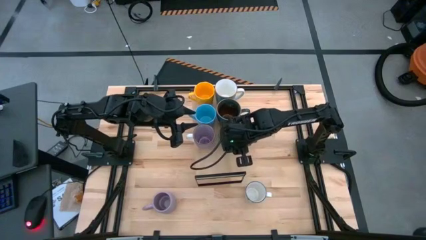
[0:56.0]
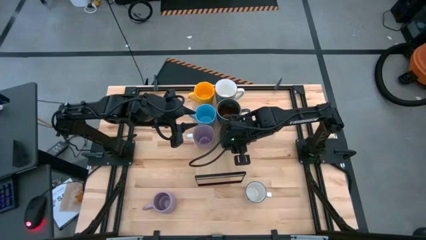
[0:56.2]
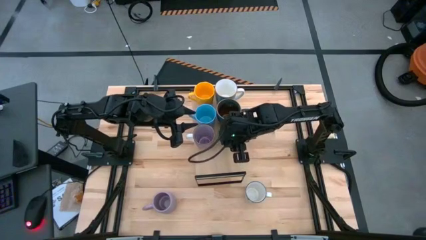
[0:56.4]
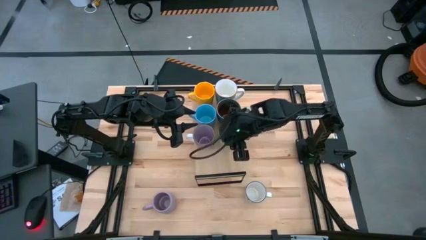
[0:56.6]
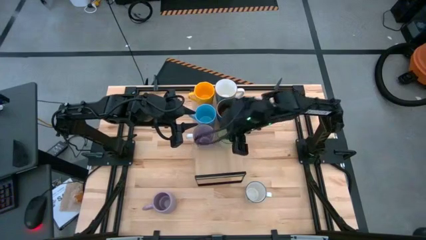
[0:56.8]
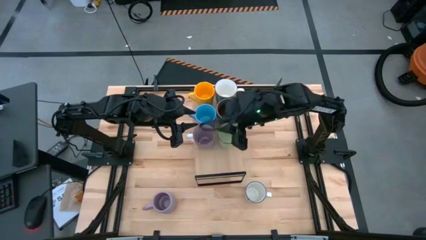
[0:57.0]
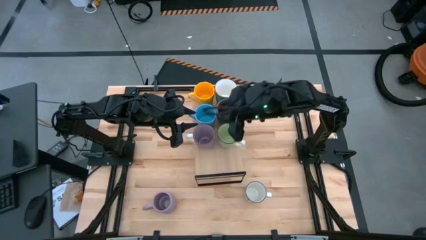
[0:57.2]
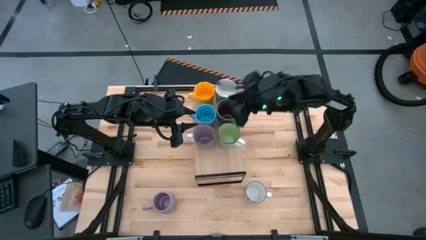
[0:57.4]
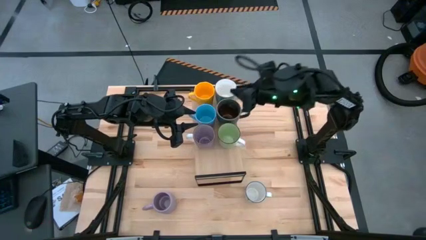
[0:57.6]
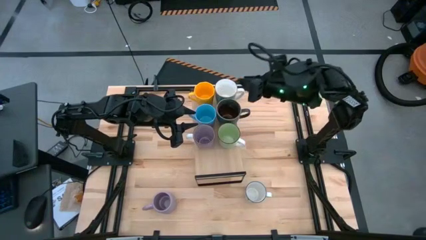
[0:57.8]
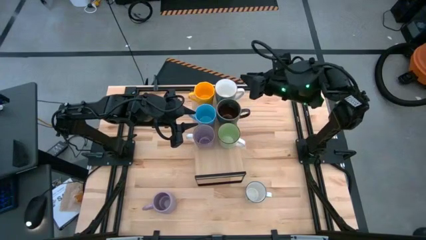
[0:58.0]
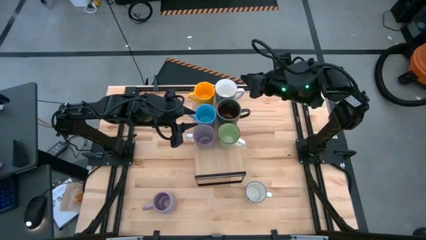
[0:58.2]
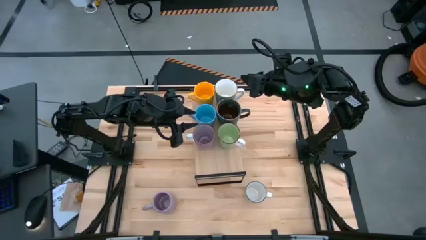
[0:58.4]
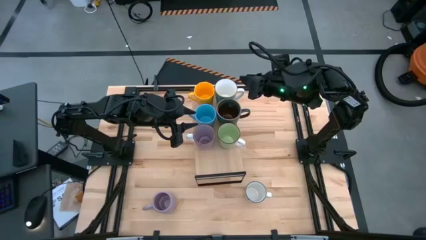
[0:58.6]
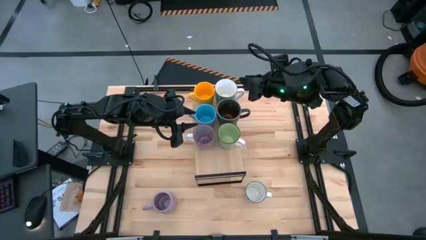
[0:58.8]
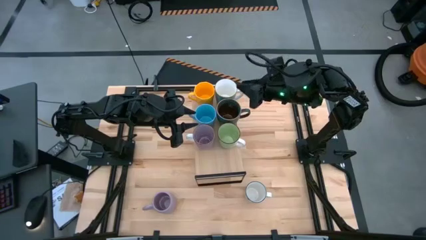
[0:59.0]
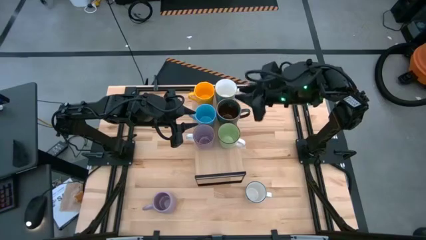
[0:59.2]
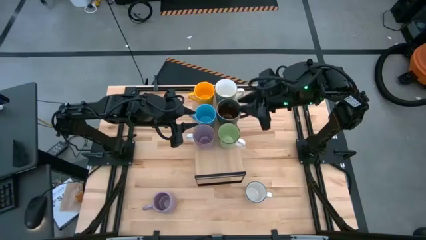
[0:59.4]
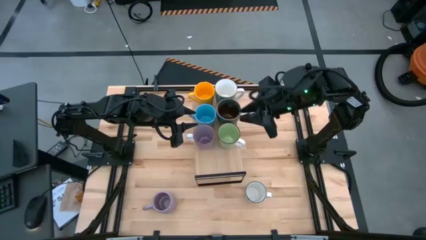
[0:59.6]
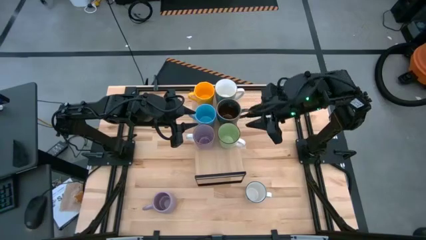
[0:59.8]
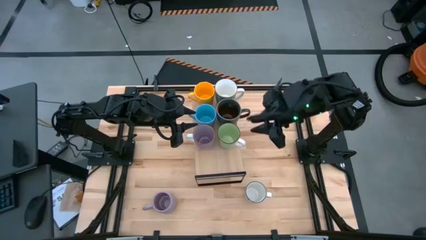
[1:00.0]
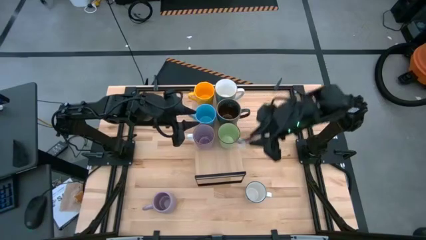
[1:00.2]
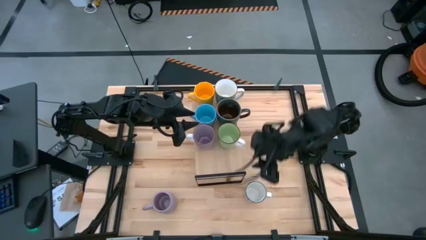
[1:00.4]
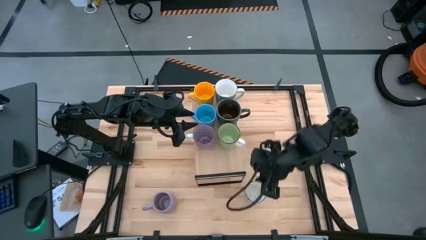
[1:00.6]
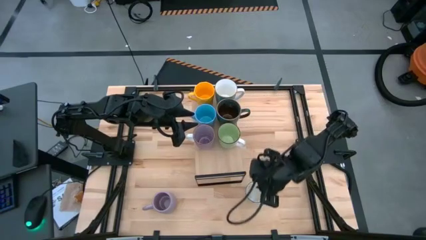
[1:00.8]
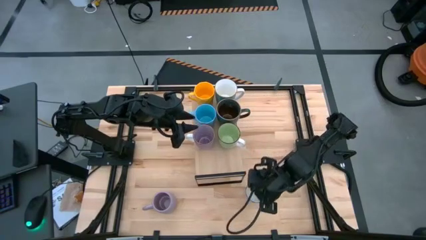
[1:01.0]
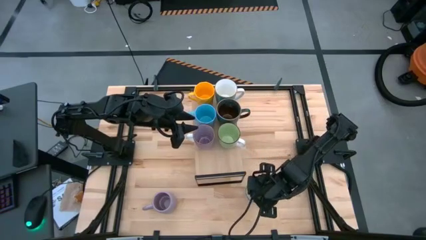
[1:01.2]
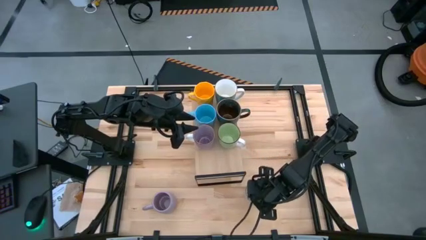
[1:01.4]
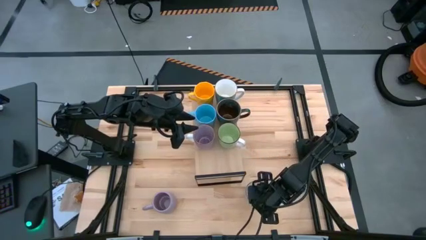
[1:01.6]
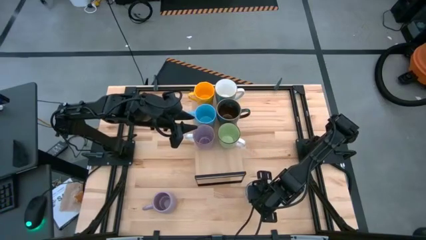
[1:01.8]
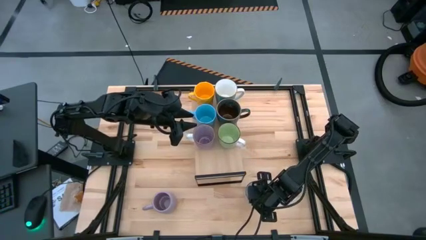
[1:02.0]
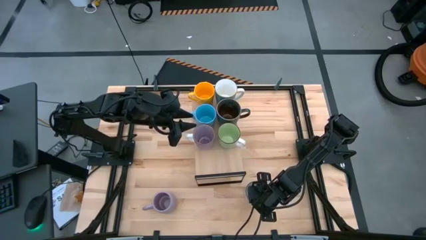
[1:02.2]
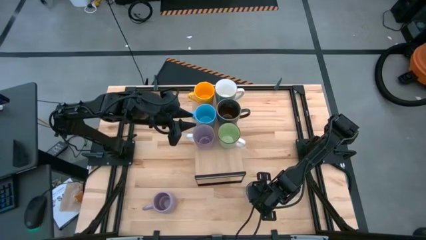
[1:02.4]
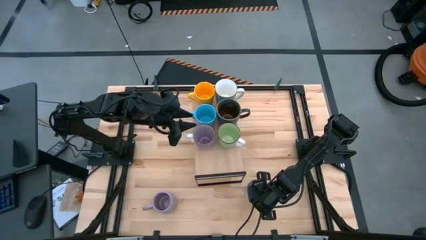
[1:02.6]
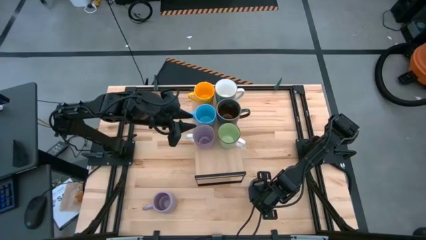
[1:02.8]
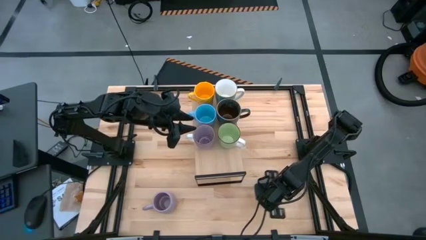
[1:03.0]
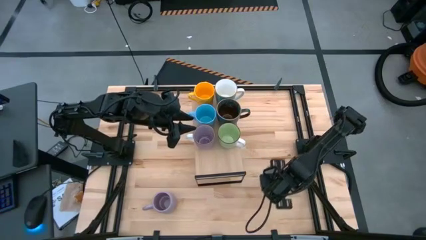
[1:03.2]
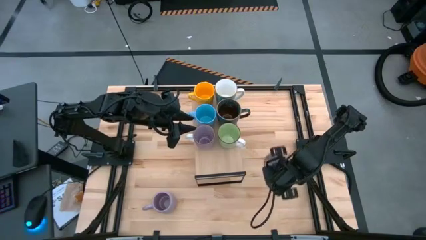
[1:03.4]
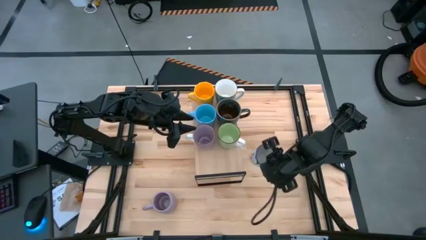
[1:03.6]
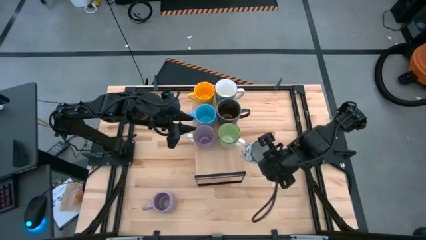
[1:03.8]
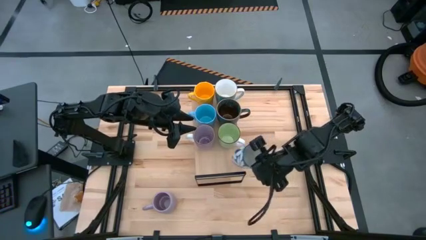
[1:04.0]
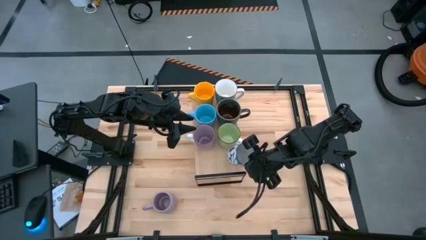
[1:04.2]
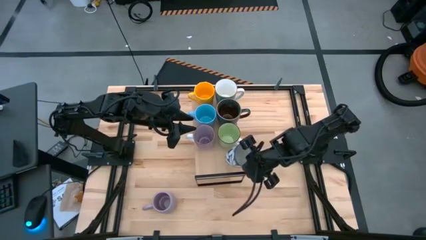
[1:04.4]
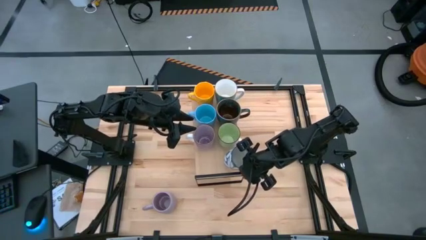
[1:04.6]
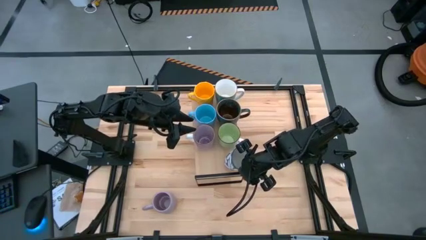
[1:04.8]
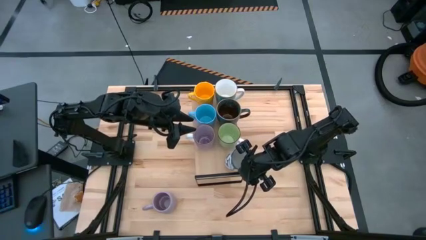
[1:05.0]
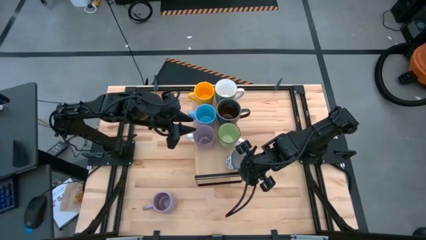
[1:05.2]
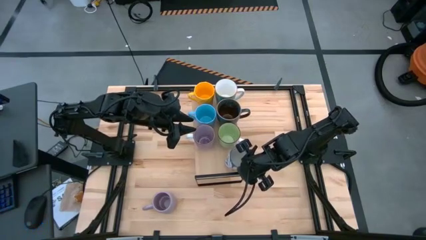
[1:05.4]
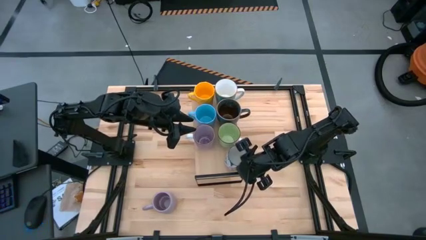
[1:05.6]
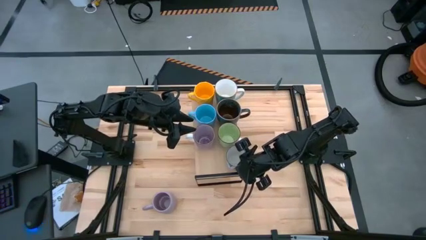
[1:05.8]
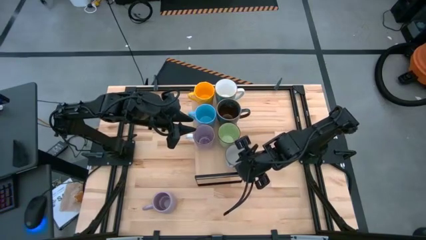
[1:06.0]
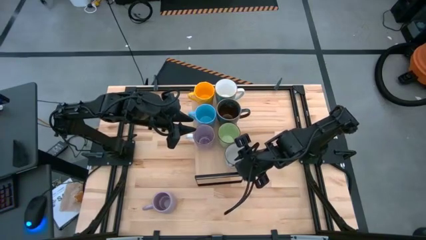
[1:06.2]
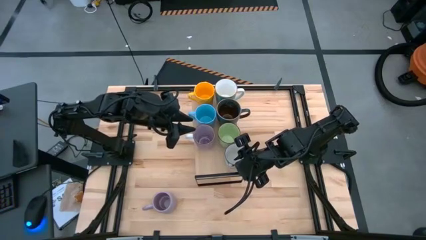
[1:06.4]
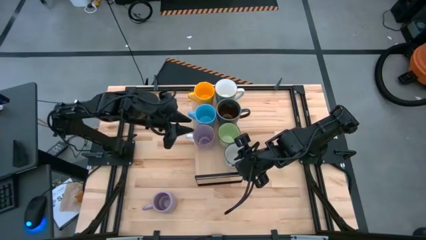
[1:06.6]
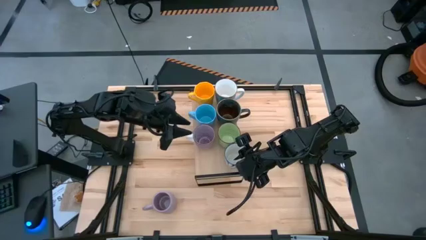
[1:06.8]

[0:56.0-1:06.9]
Task: Place coffee mugs
Put the blue patterned mug on the shelf

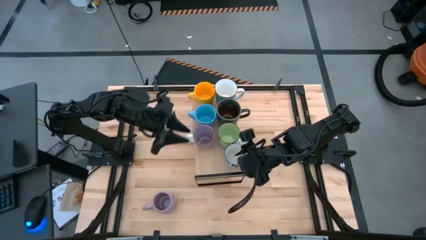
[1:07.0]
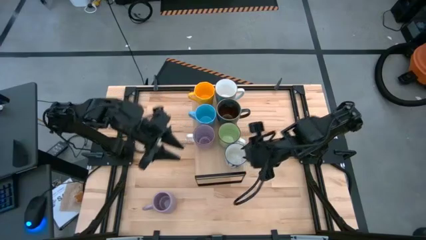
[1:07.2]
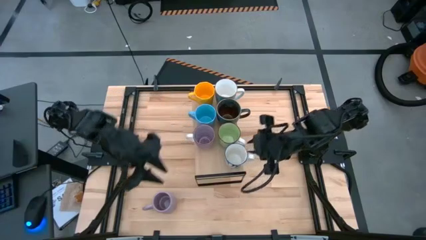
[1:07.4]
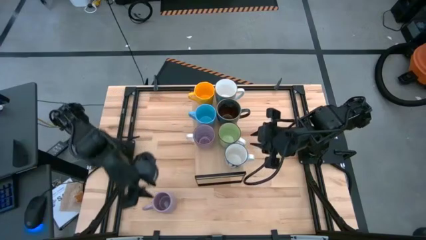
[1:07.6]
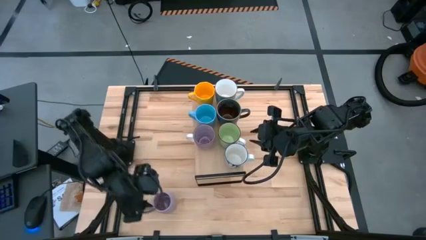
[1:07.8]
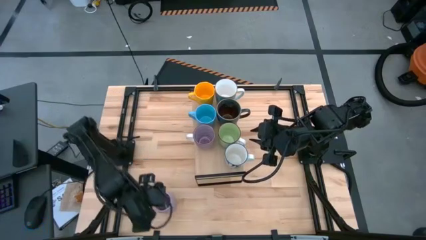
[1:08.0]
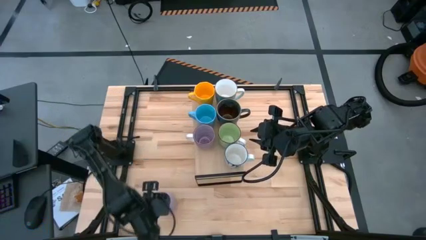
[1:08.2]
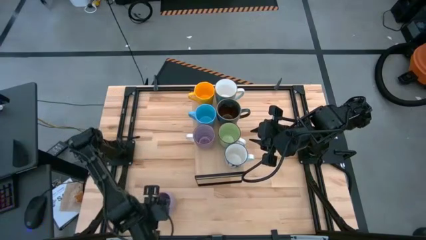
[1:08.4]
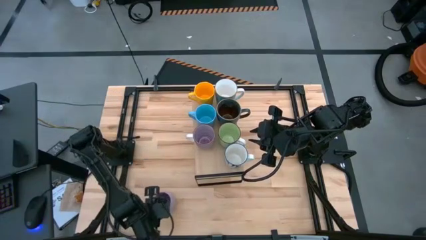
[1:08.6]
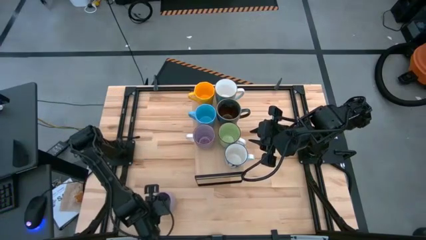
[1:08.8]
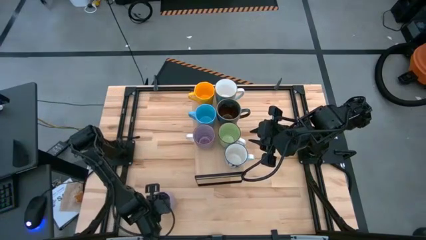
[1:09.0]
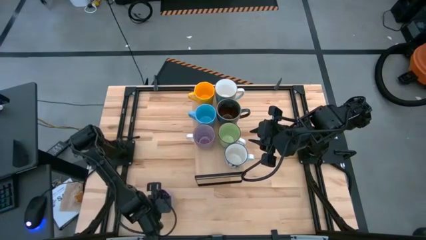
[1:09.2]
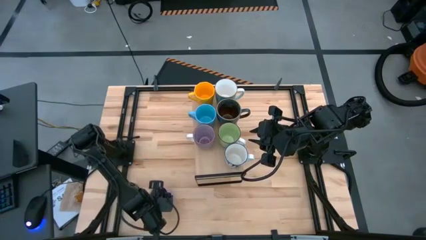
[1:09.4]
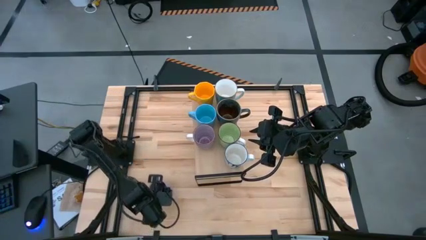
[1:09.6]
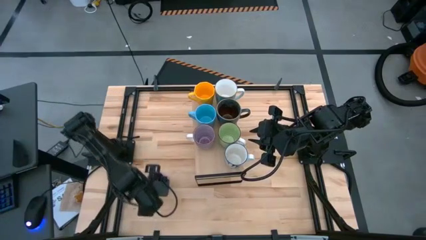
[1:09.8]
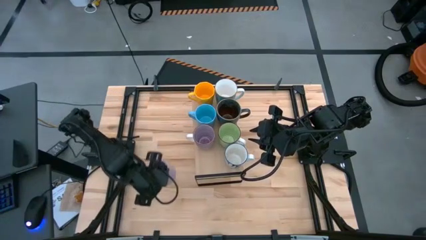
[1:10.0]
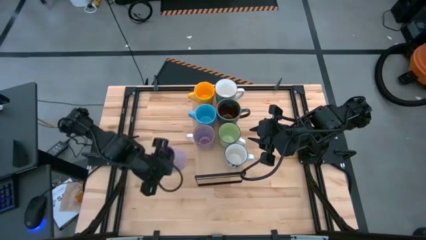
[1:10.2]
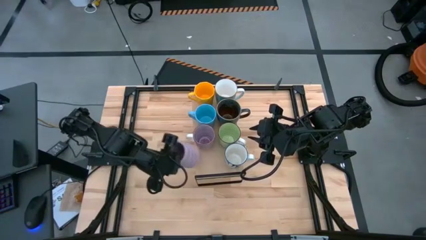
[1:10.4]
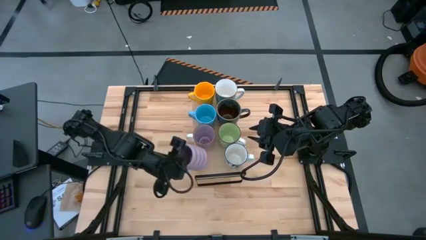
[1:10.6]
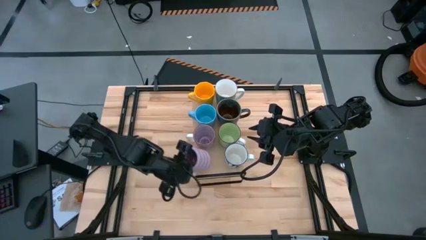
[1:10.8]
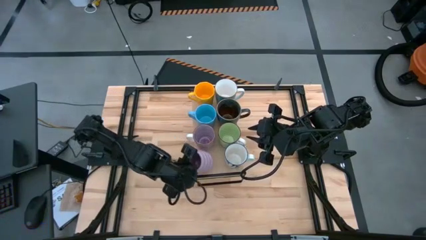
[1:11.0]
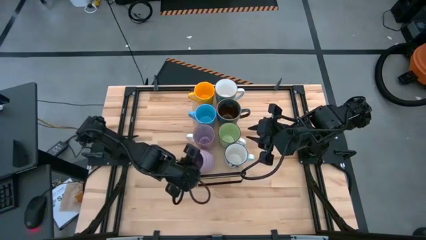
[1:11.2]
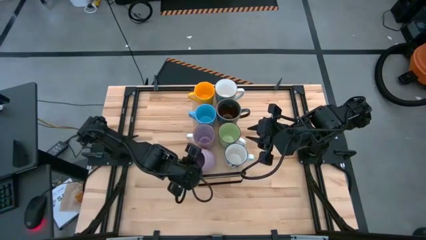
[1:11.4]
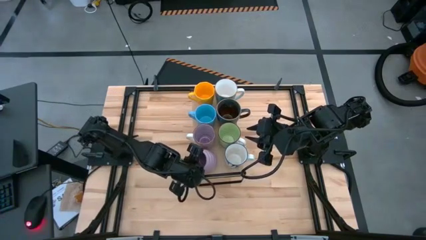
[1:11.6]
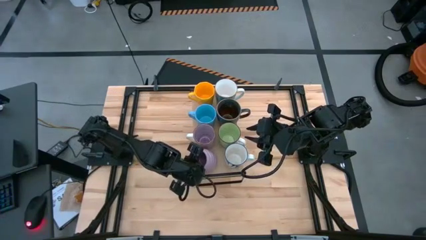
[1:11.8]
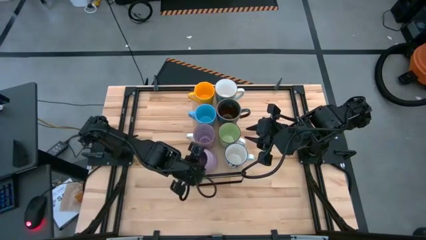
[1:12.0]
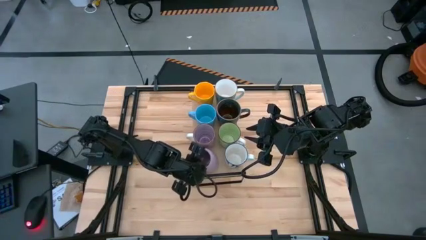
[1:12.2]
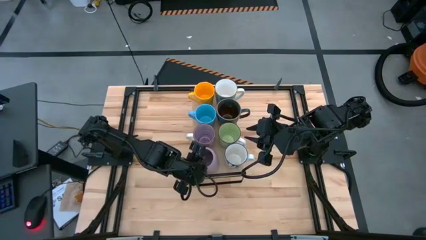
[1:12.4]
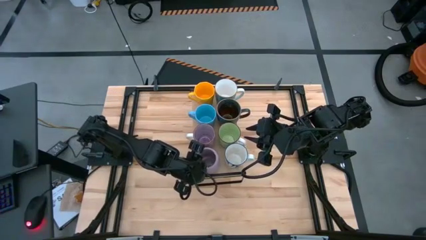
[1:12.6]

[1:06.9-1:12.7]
Put the purple mug on the shelf
